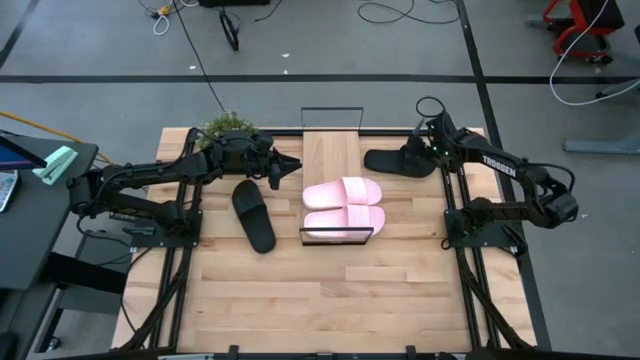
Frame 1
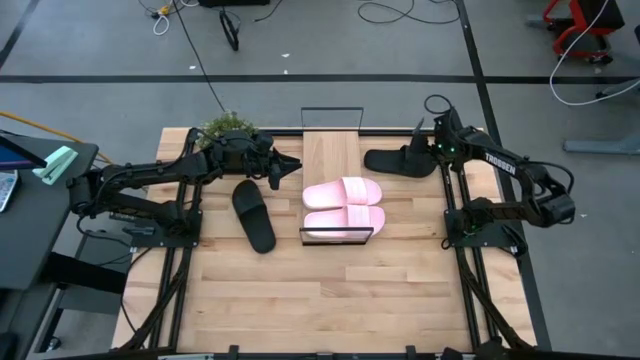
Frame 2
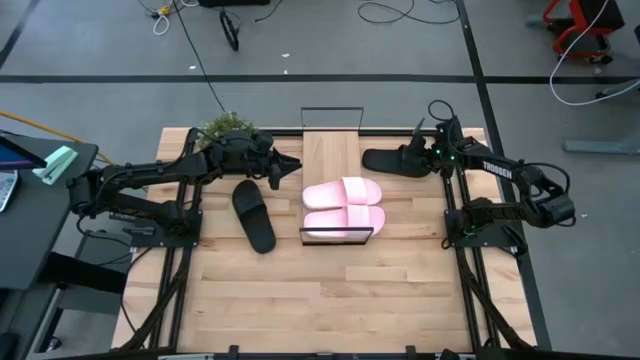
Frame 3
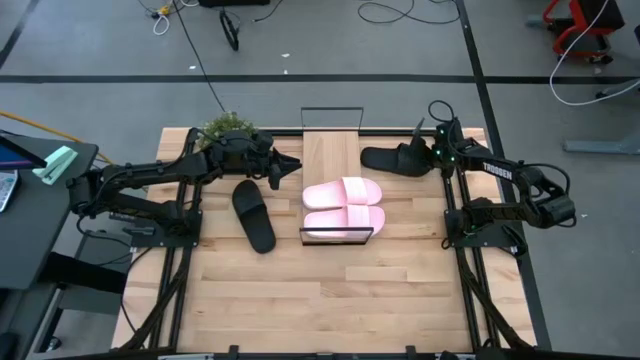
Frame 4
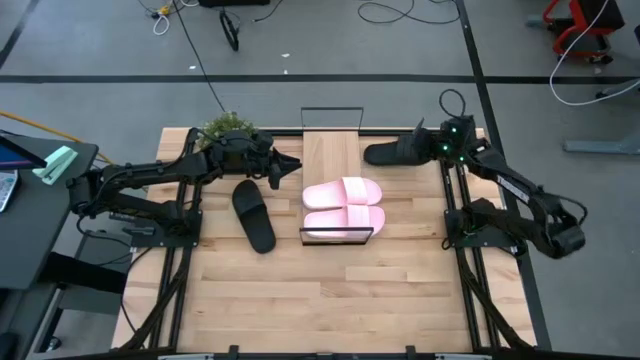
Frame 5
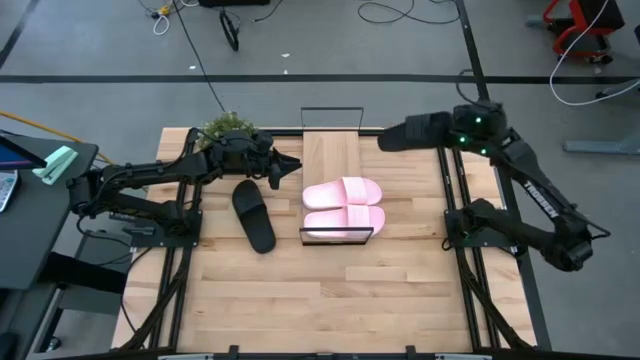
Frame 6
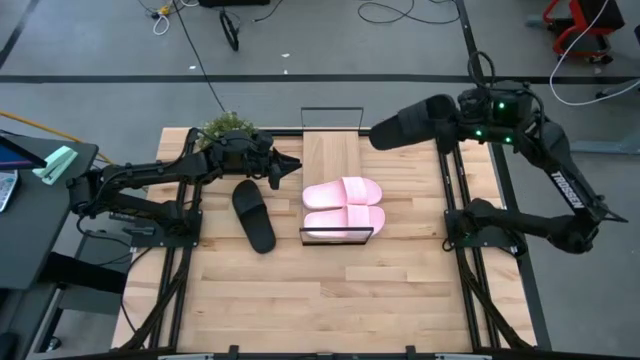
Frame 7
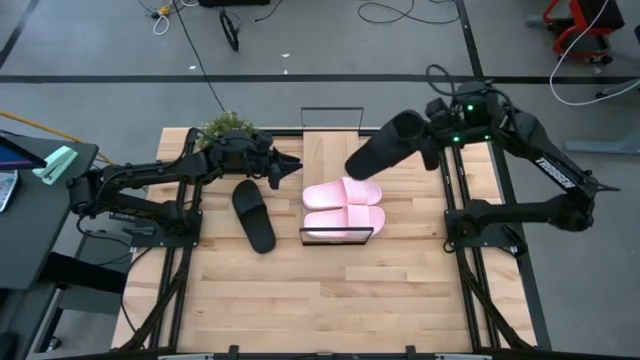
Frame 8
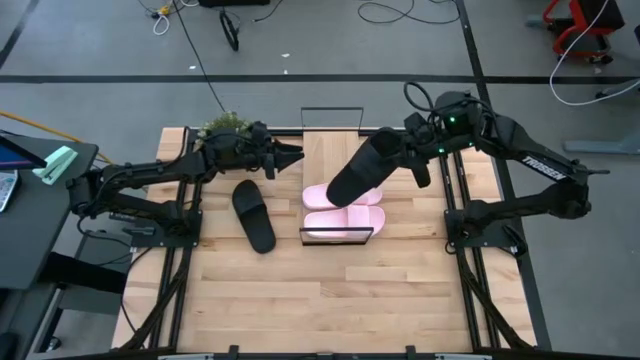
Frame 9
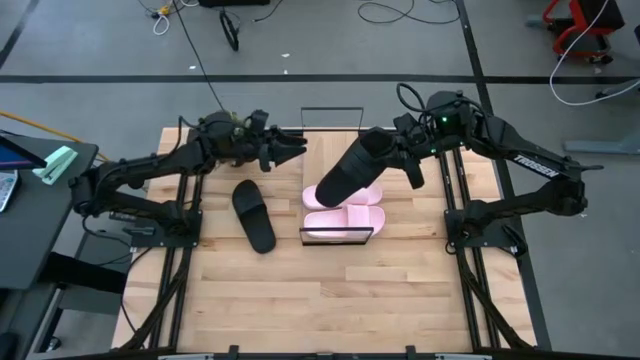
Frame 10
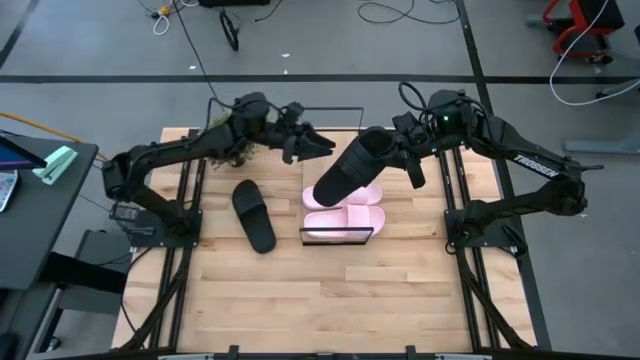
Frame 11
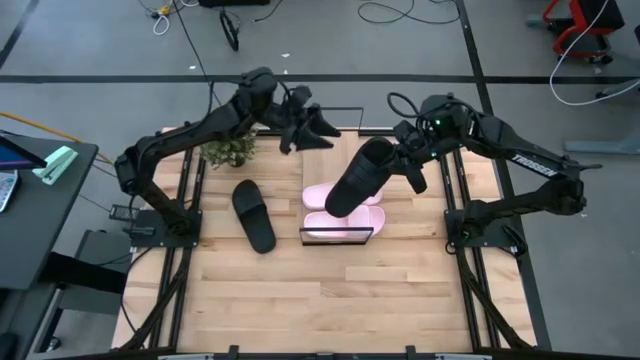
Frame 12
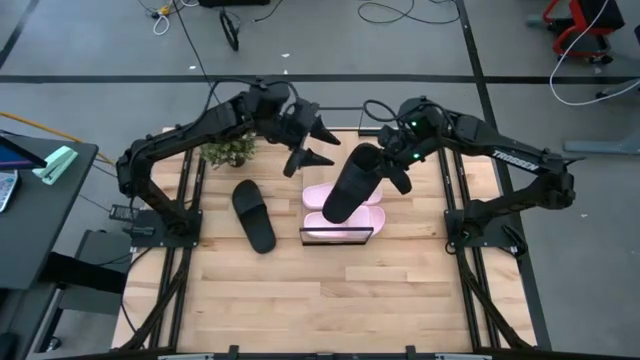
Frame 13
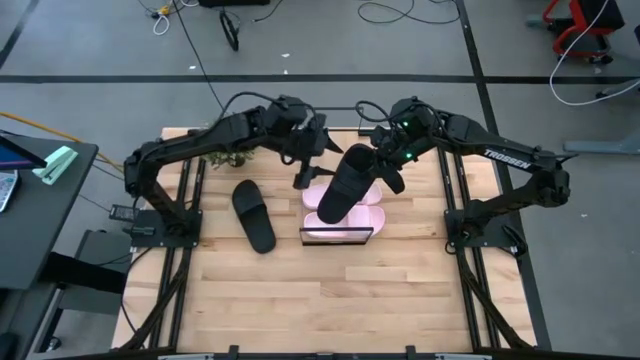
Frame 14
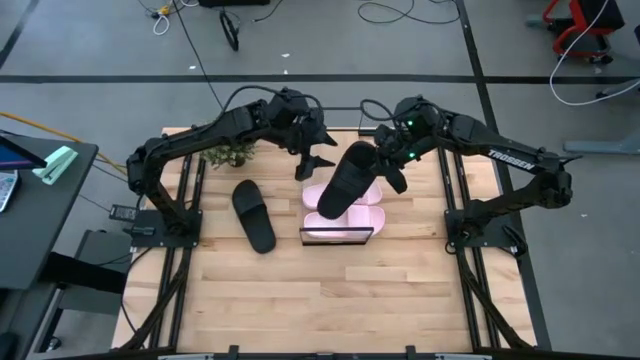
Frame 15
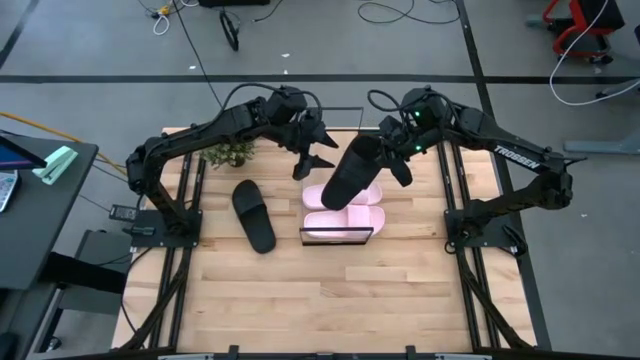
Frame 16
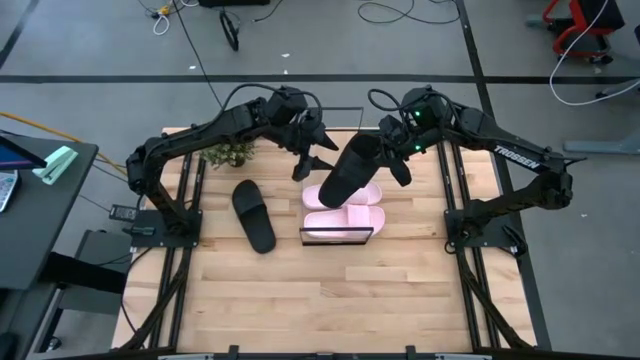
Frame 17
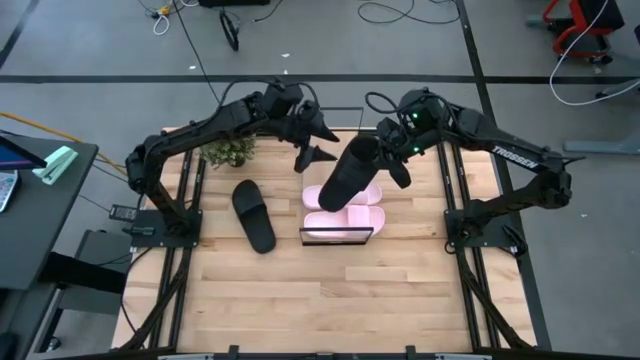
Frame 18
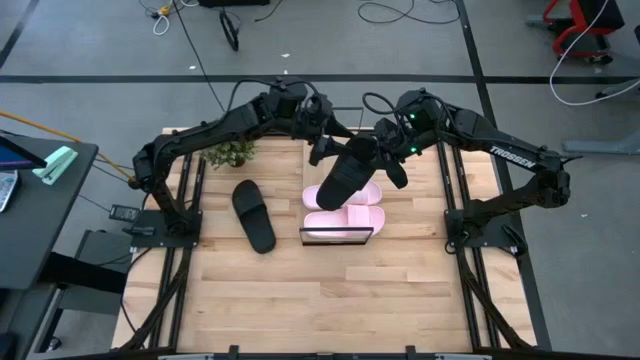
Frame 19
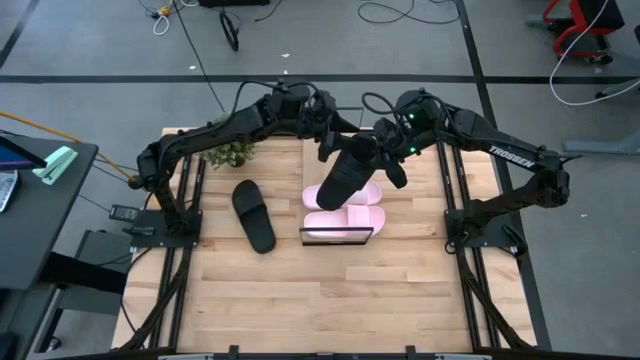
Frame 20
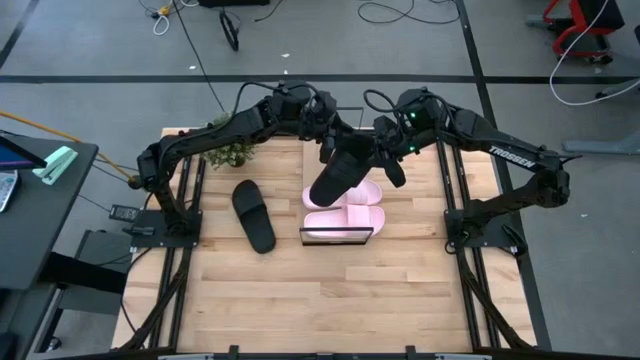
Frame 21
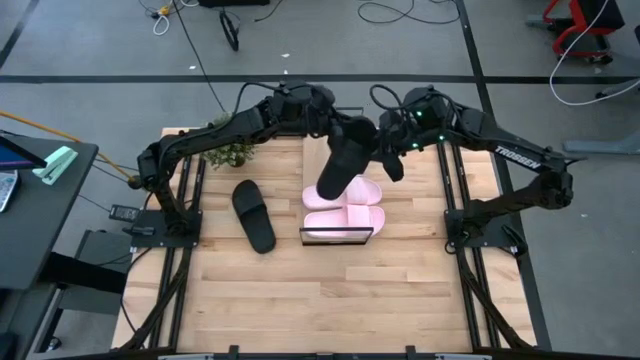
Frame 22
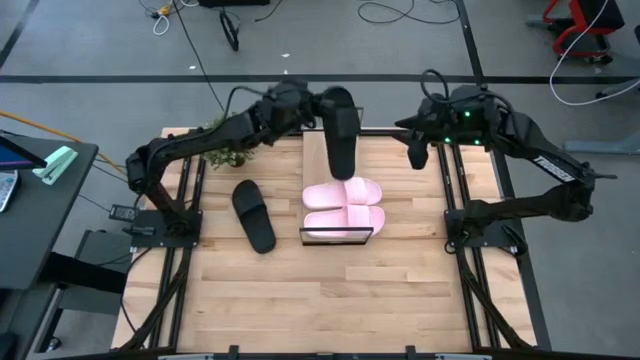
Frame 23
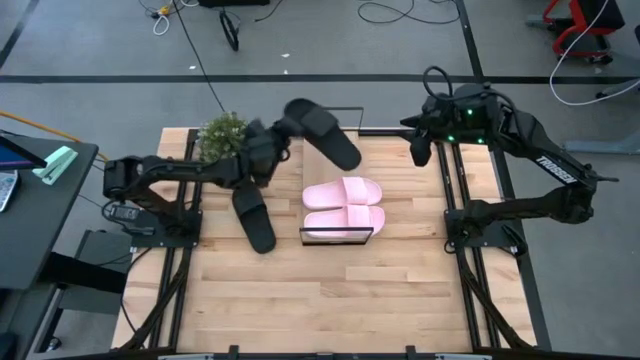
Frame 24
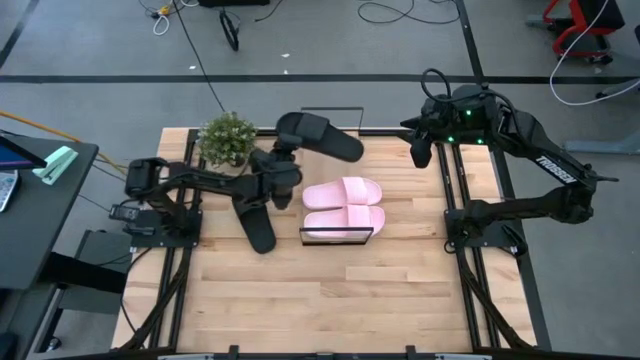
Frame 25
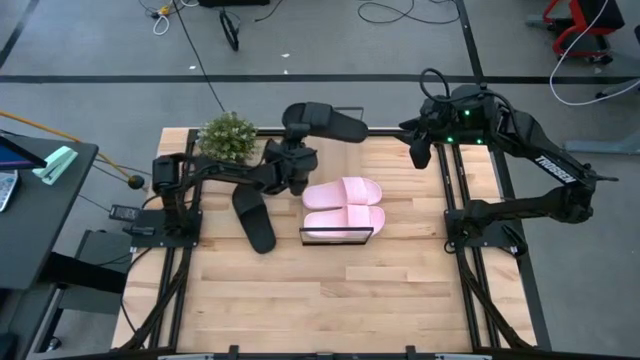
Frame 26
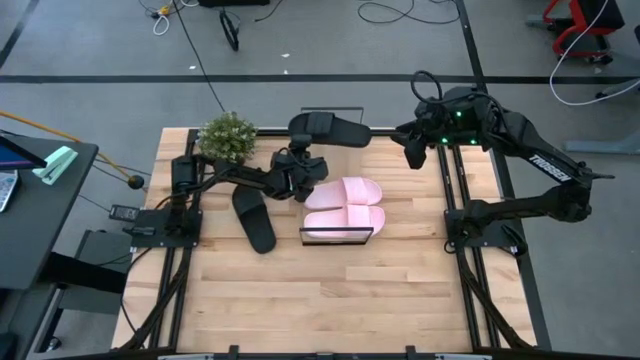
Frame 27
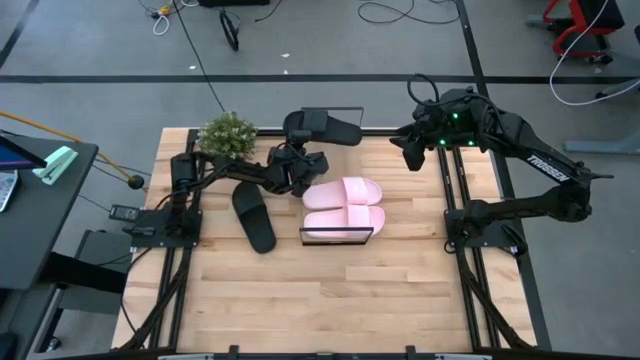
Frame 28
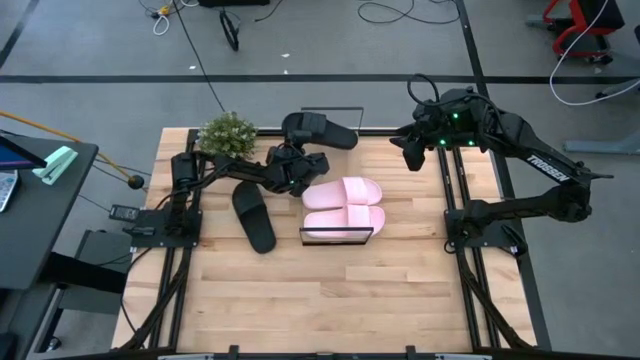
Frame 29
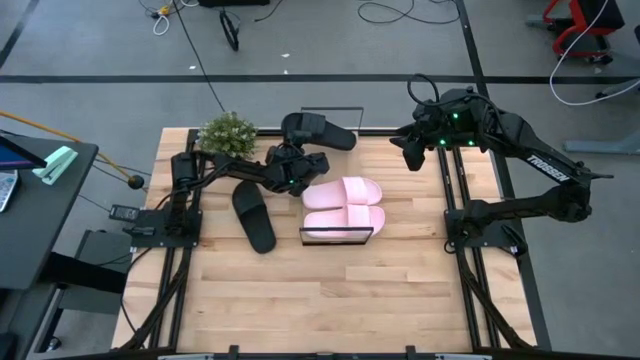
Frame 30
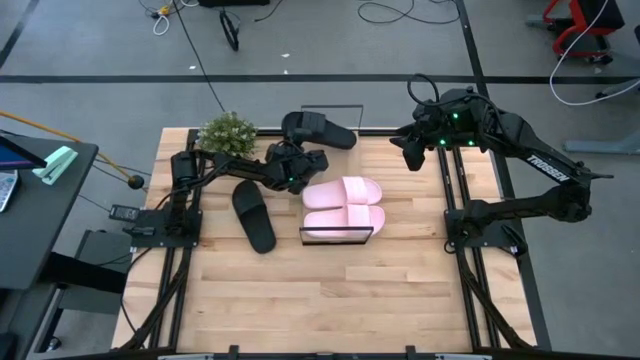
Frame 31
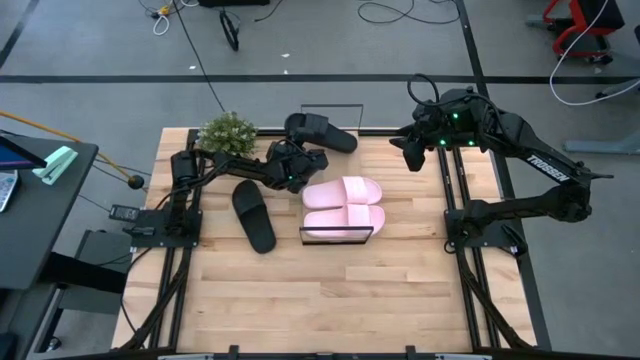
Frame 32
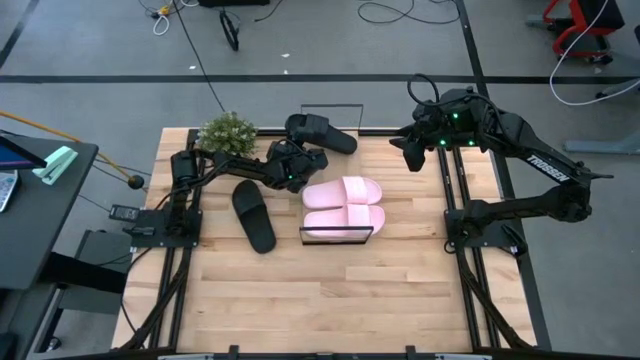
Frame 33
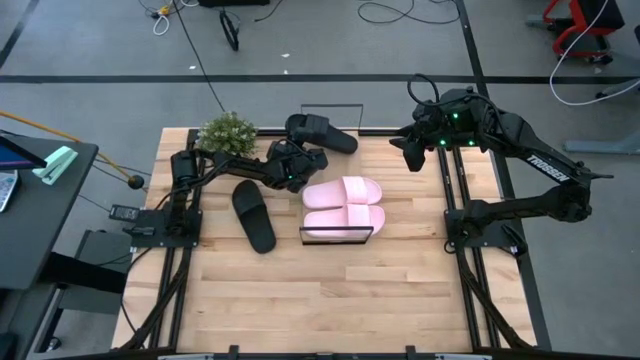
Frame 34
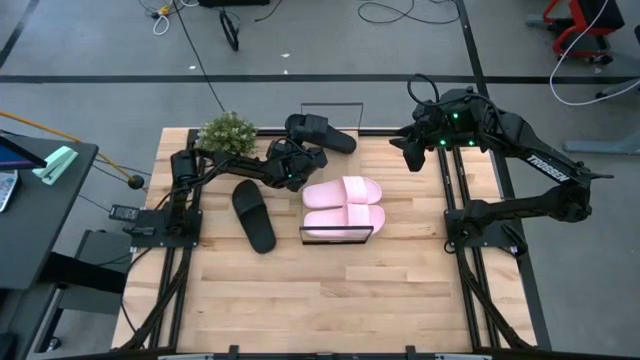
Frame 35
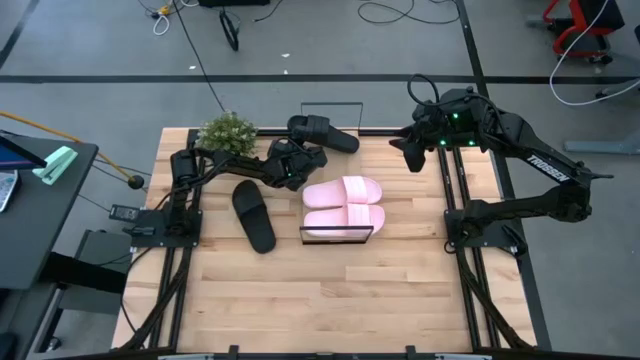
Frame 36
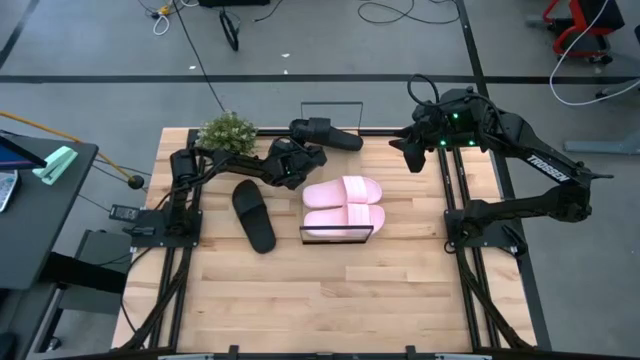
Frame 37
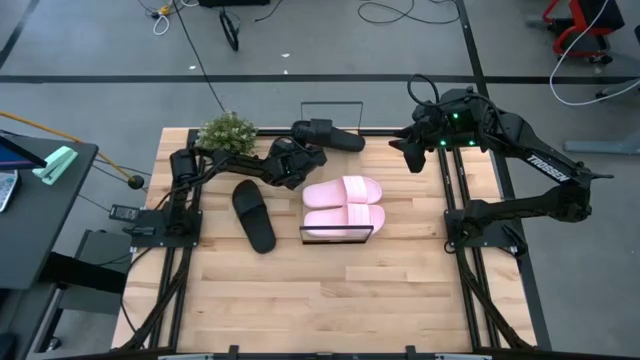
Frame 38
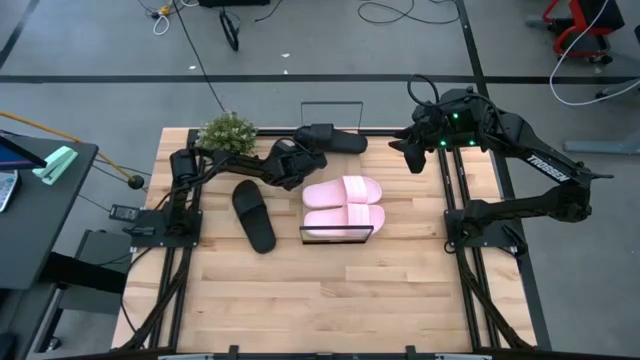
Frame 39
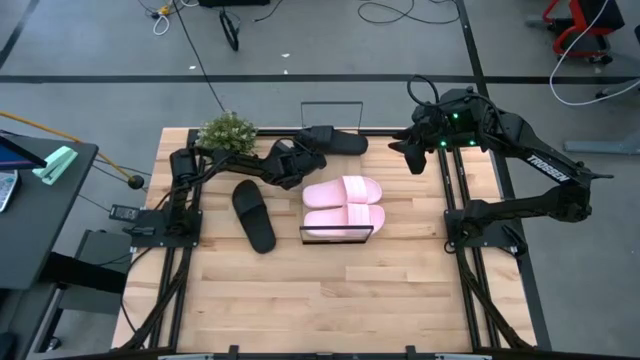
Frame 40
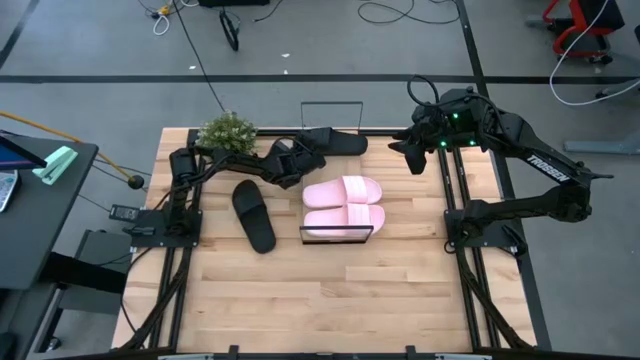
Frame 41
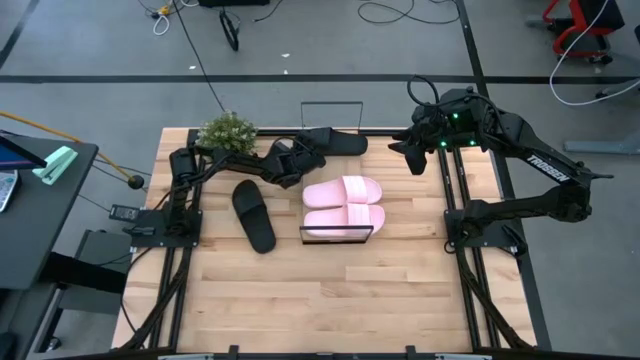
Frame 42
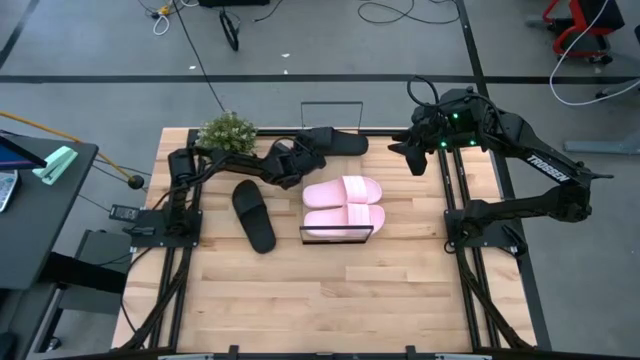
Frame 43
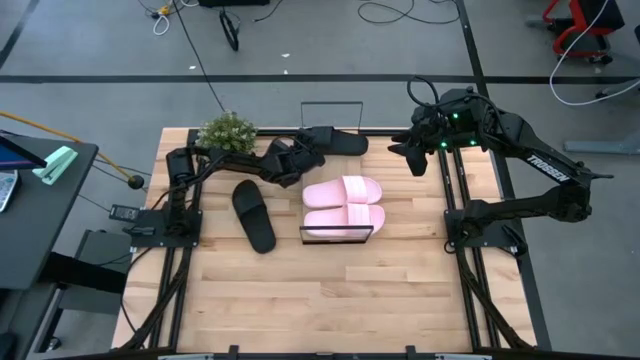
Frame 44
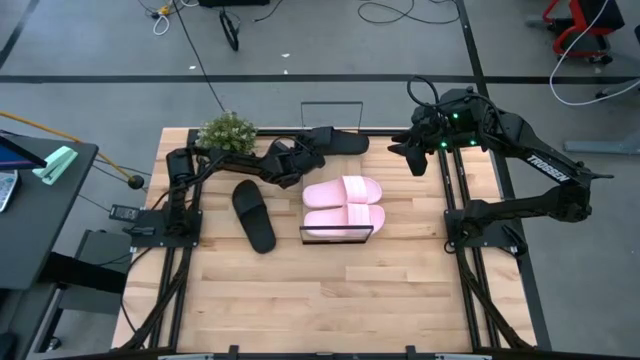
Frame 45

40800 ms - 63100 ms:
Task: Pick and place slides into the shelf
Put the right black slides on the shelf
